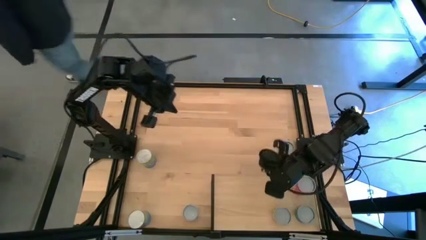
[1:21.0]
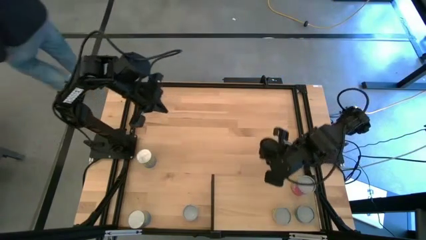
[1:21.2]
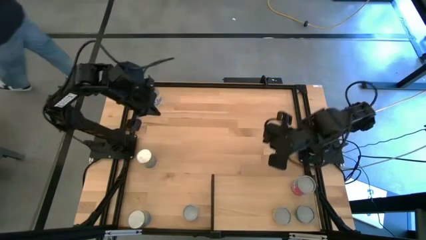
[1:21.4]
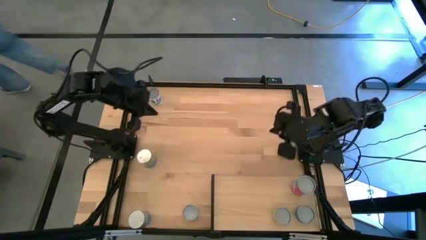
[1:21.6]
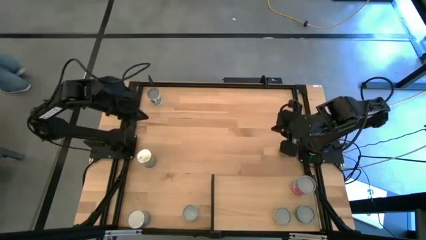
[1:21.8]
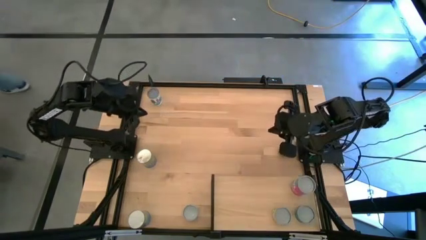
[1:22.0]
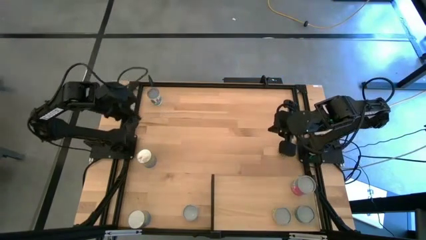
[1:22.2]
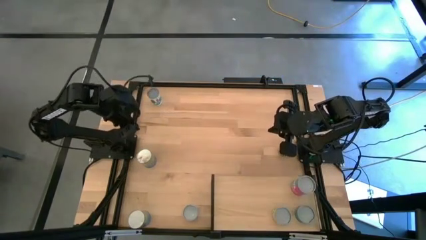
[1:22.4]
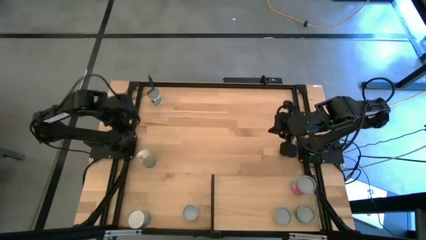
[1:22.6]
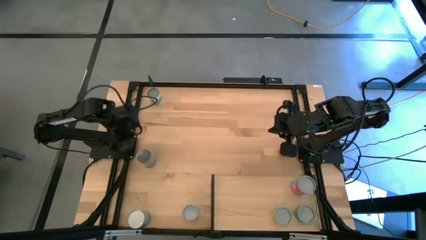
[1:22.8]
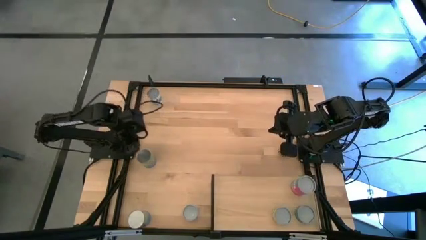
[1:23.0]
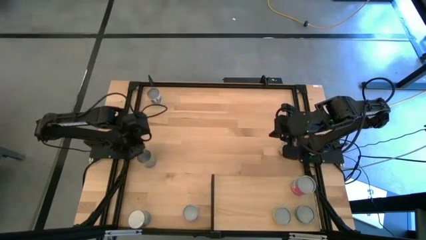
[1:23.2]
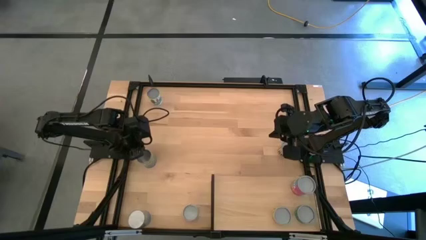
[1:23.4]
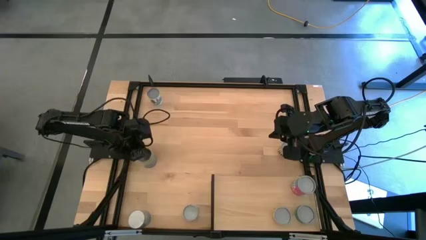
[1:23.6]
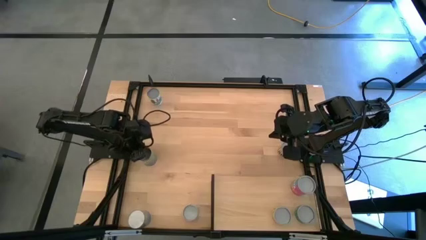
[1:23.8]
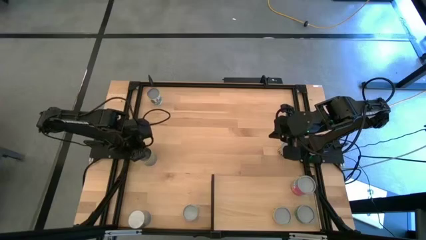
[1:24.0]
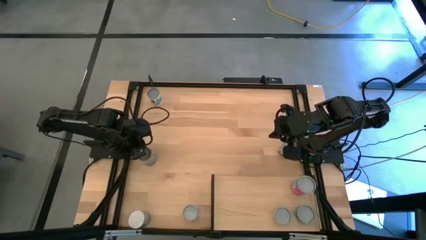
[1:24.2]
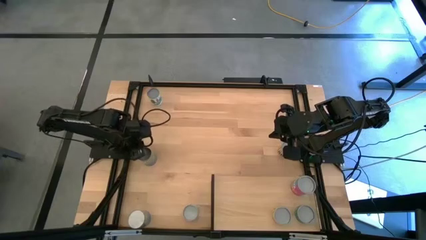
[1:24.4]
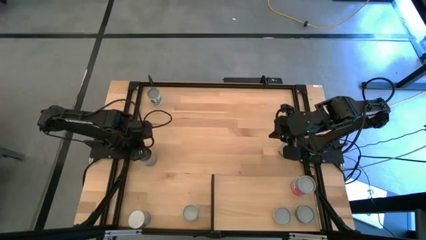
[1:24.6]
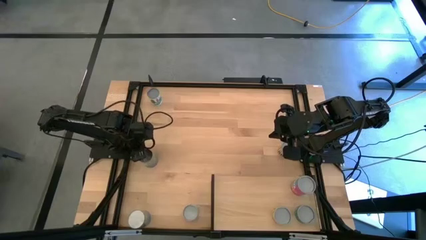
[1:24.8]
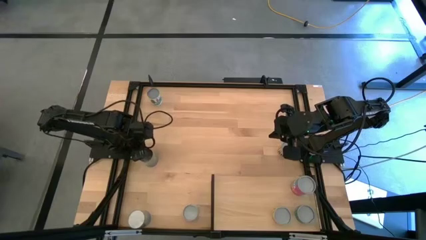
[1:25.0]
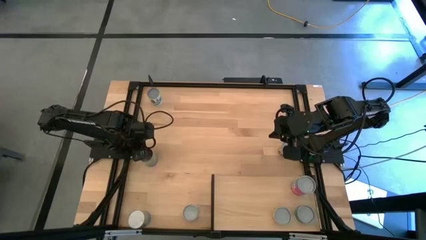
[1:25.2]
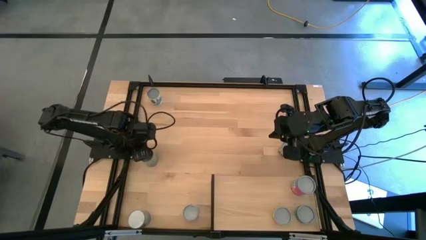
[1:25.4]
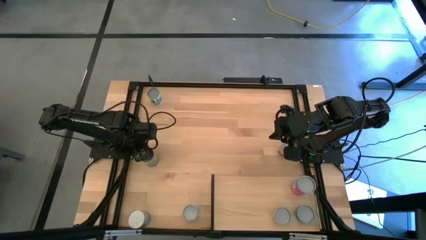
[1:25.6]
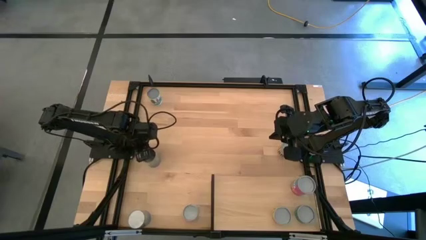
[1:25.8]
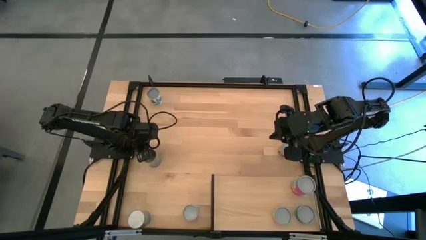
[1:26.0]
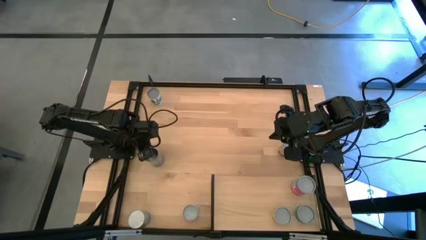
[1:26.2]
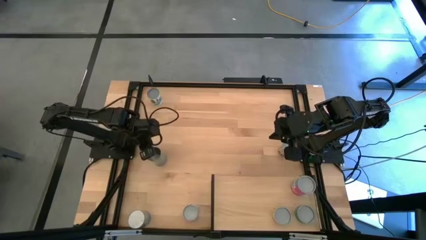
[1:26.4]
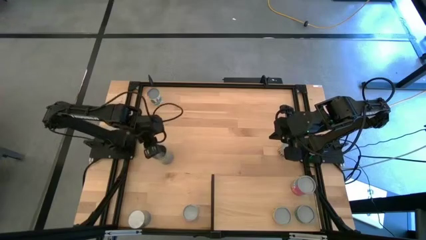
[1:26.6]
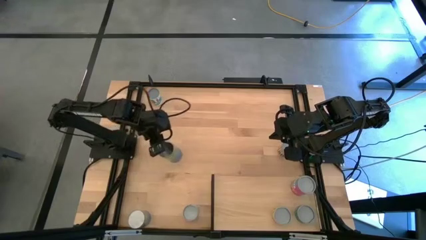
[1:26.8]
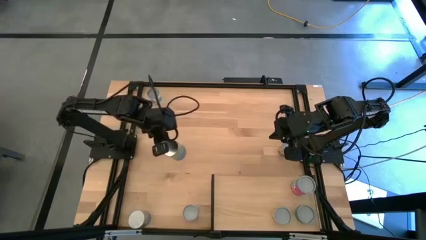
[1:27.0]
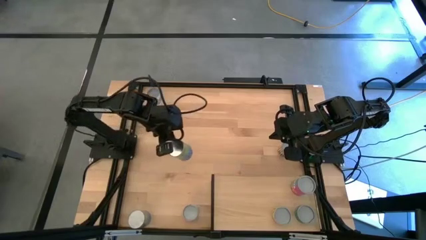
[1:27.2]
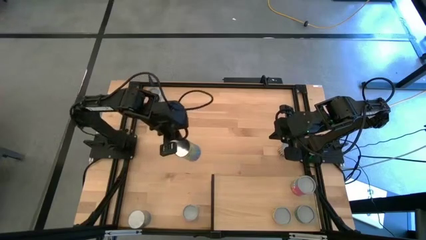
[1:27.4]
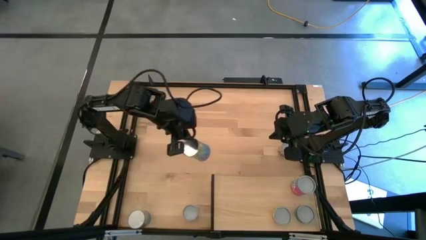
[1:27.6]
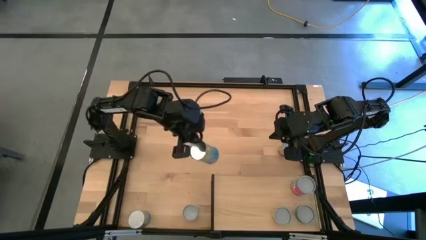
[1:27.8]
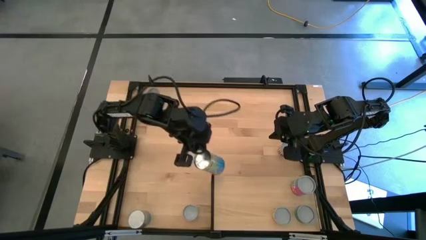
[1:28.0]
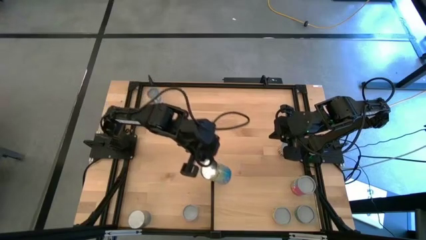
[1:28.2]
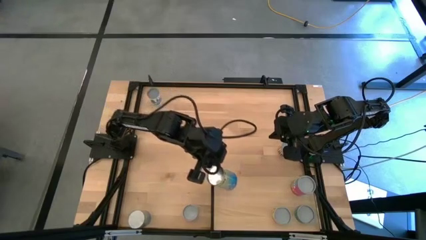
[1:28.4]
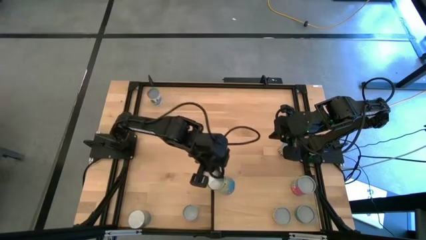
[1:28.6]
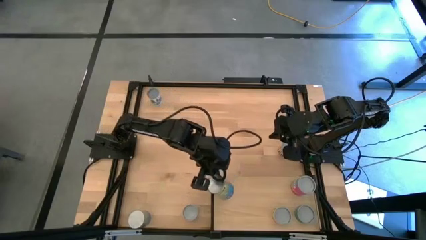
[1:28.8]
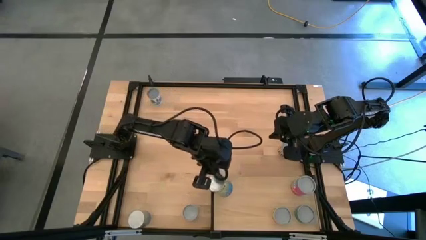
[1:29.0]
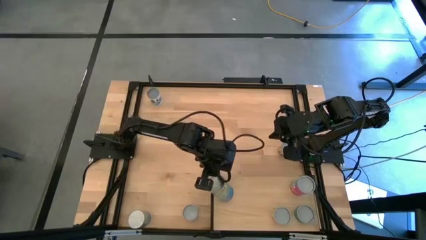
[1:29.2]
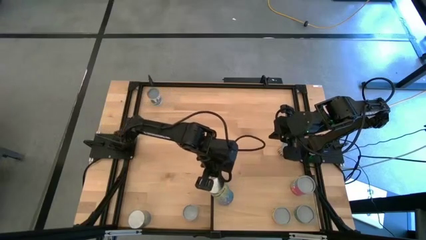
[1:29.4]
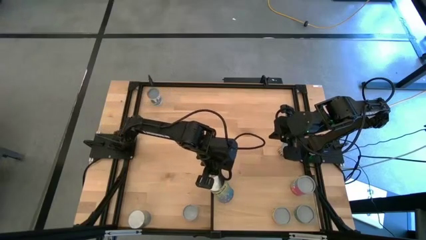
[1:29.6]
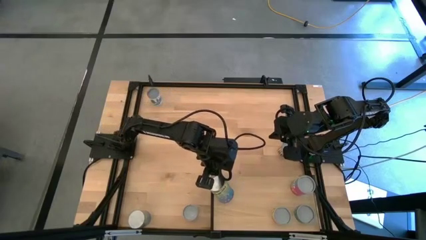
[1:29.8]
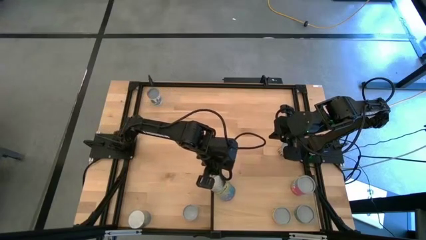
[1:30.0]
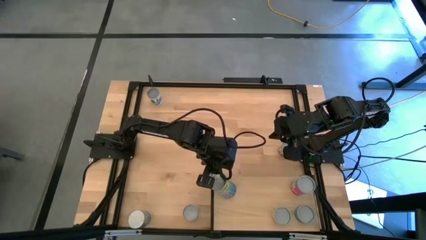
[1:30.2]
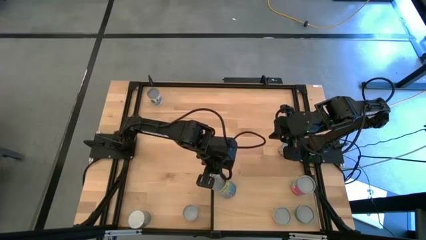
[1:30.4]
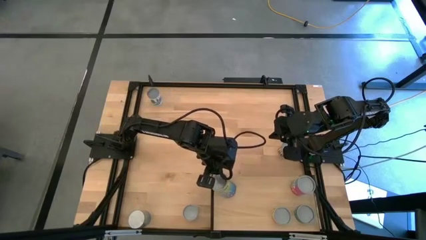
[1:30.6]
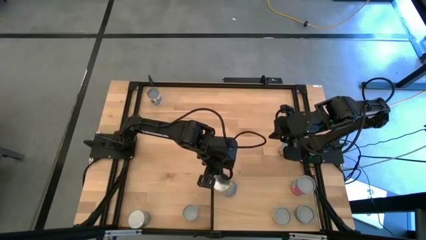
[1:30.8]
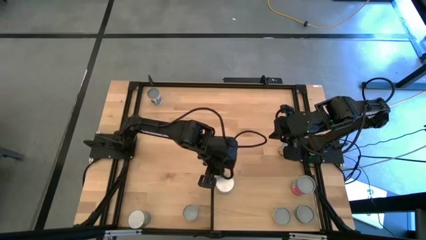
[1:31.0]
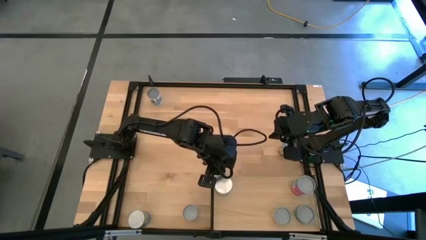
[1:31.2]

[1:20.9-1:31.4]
Task: Pick and place cans onto a shelf
Put the top canned cherries on the shelf
